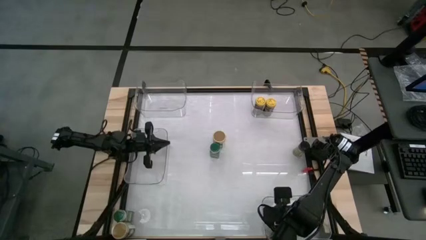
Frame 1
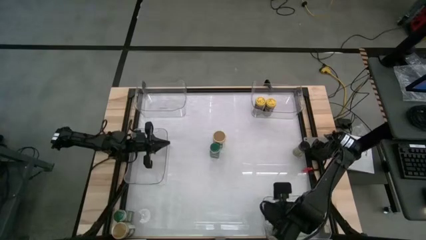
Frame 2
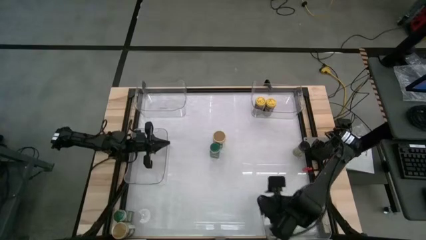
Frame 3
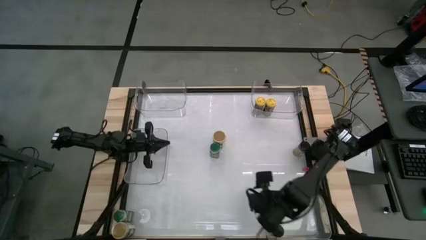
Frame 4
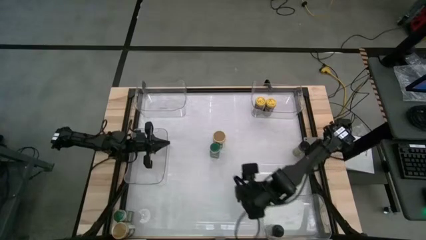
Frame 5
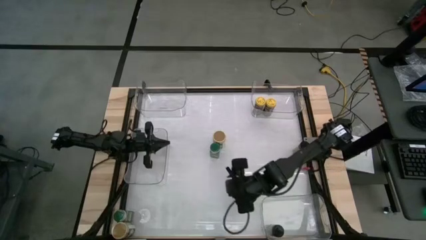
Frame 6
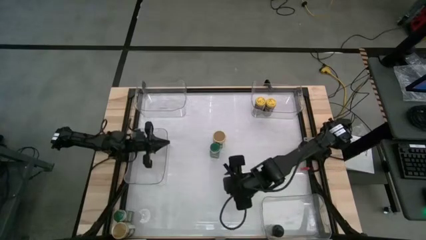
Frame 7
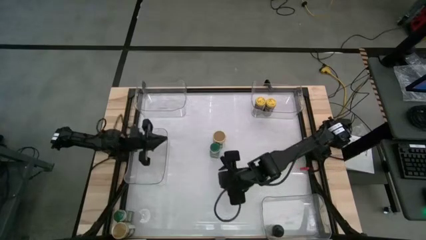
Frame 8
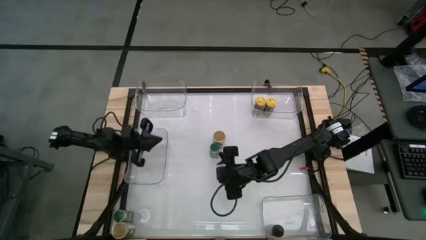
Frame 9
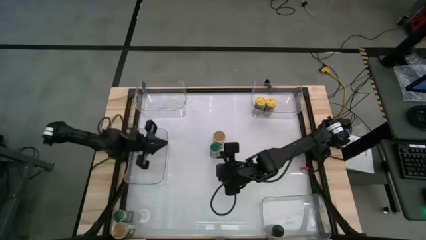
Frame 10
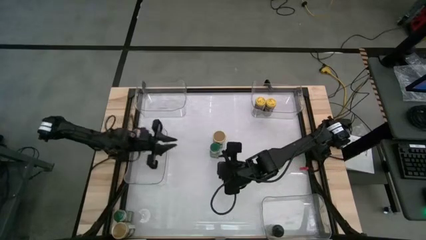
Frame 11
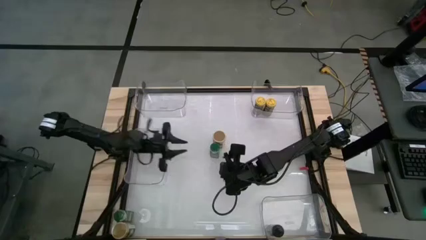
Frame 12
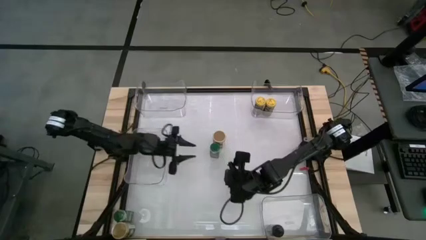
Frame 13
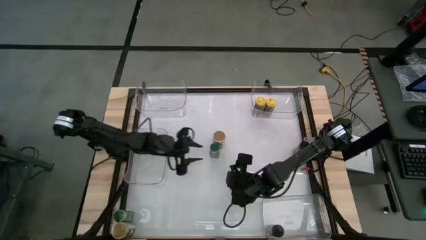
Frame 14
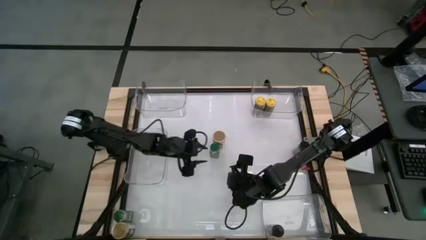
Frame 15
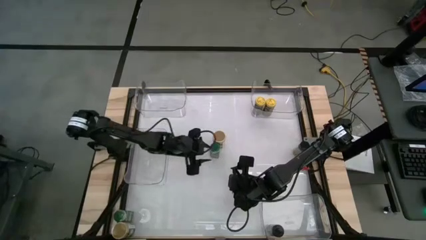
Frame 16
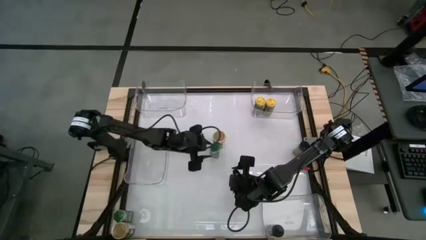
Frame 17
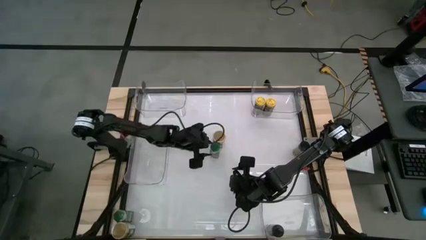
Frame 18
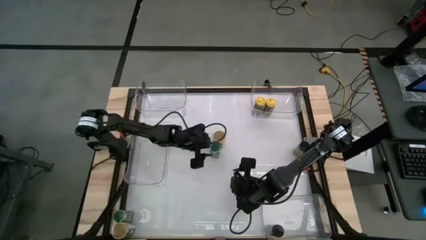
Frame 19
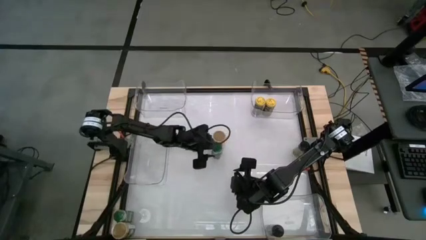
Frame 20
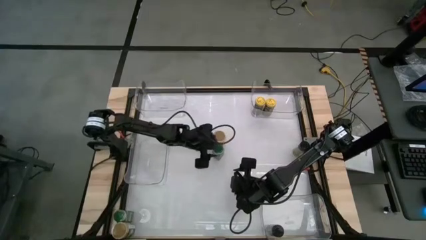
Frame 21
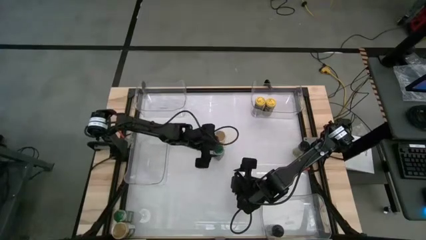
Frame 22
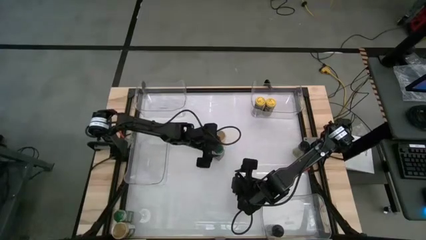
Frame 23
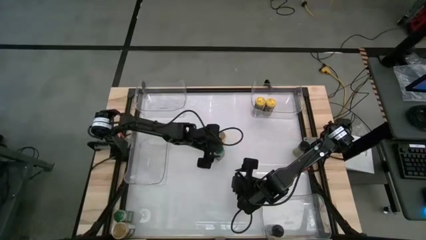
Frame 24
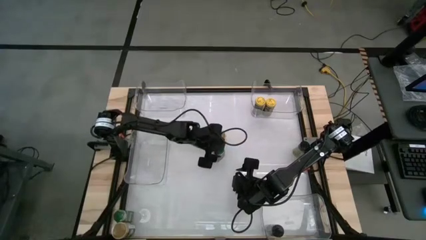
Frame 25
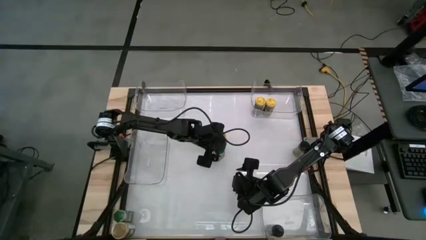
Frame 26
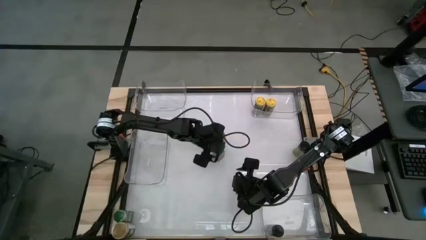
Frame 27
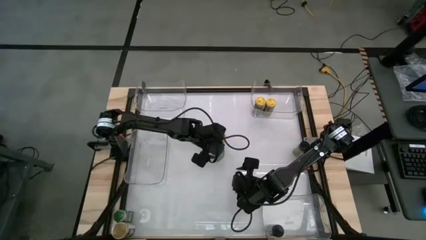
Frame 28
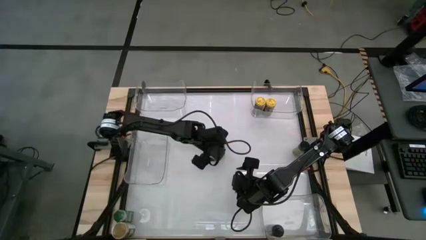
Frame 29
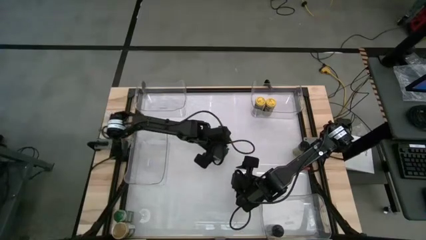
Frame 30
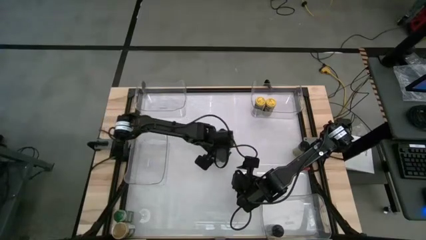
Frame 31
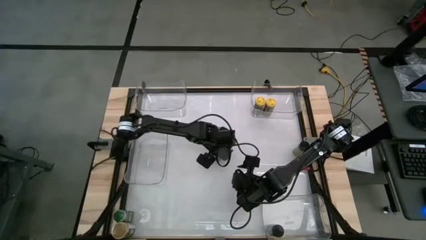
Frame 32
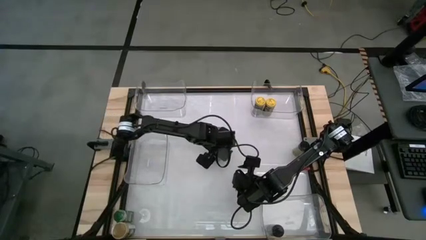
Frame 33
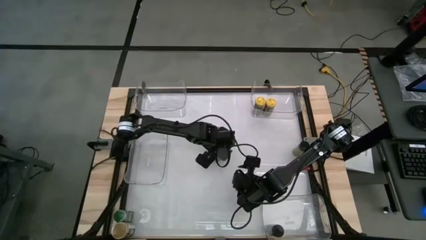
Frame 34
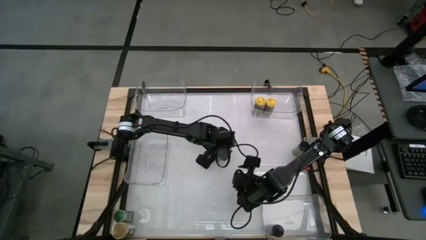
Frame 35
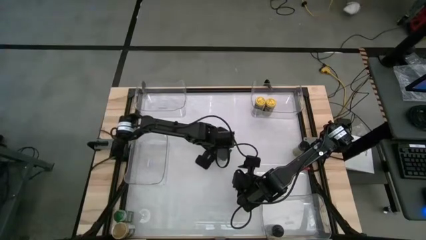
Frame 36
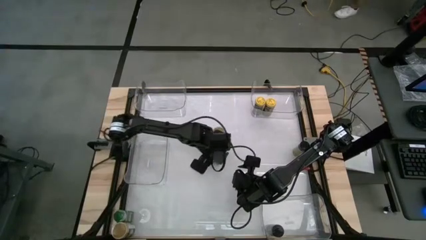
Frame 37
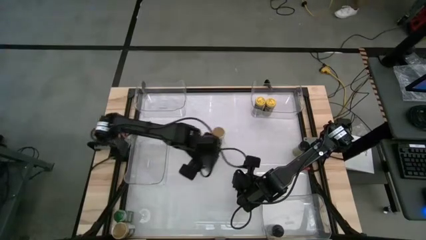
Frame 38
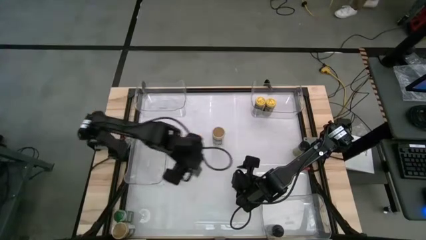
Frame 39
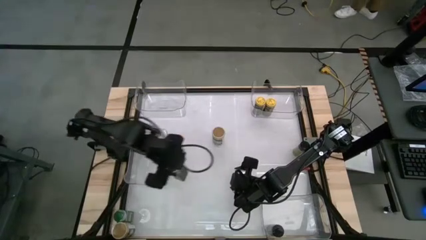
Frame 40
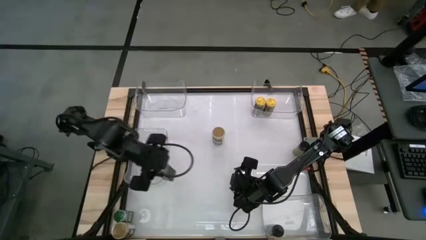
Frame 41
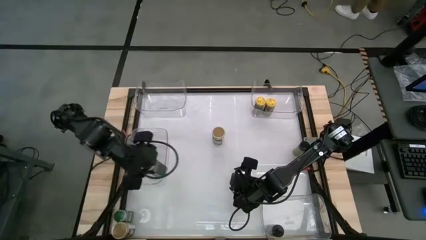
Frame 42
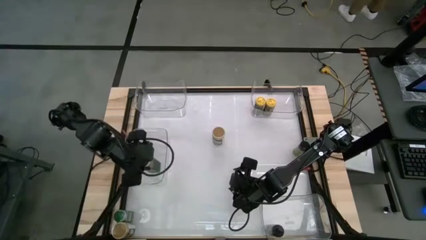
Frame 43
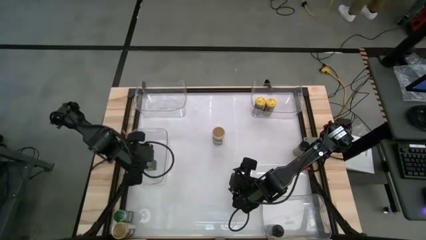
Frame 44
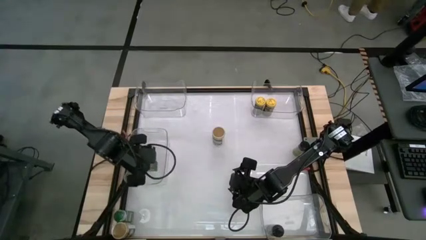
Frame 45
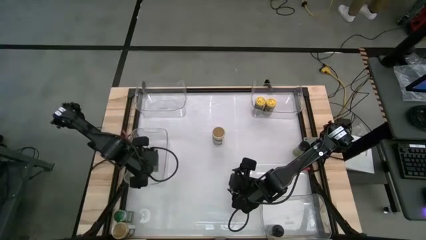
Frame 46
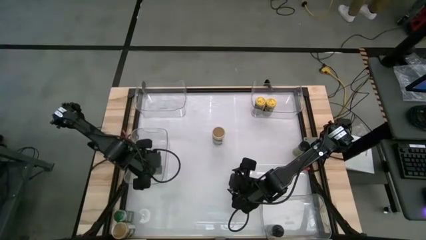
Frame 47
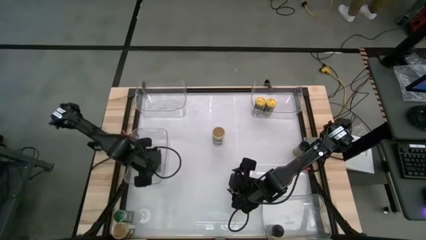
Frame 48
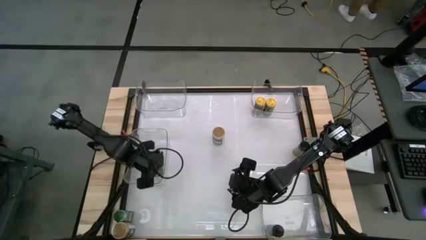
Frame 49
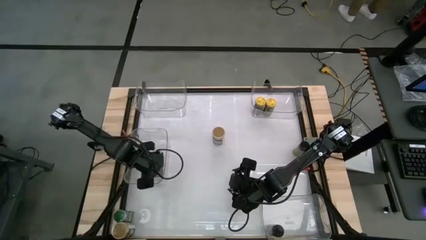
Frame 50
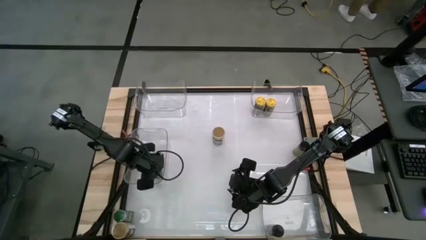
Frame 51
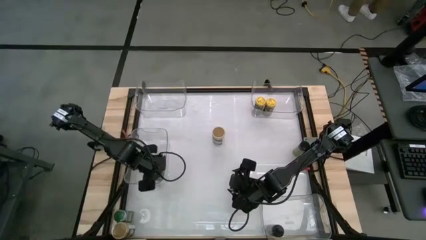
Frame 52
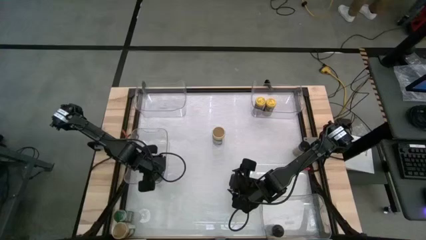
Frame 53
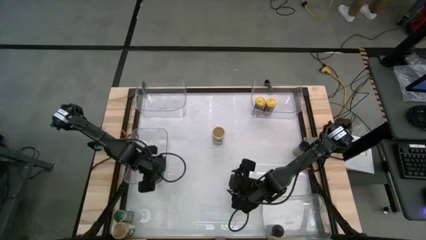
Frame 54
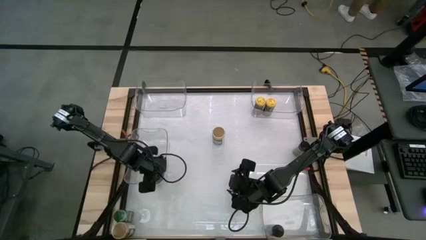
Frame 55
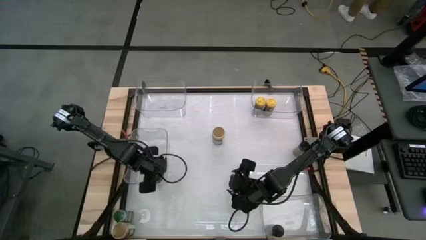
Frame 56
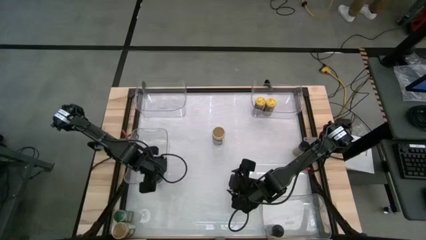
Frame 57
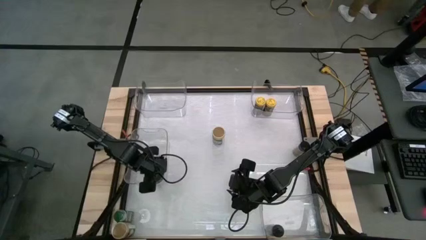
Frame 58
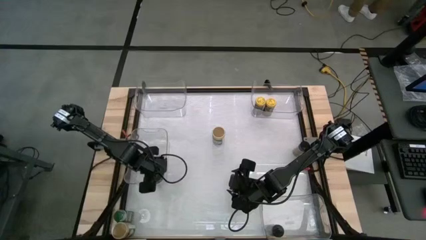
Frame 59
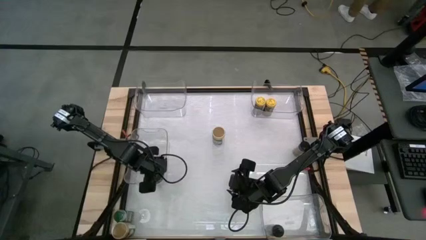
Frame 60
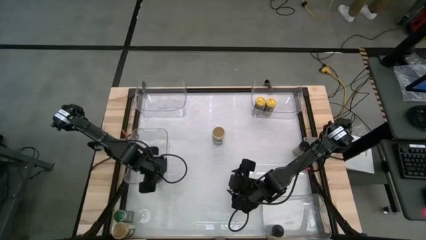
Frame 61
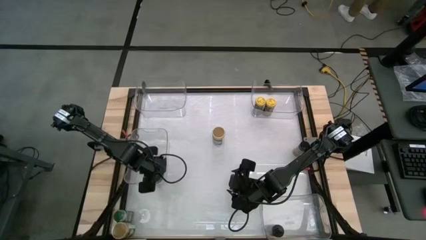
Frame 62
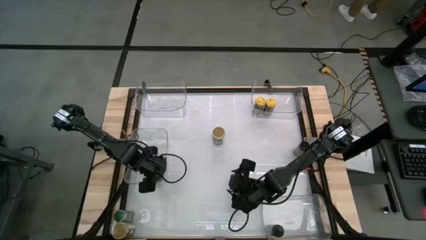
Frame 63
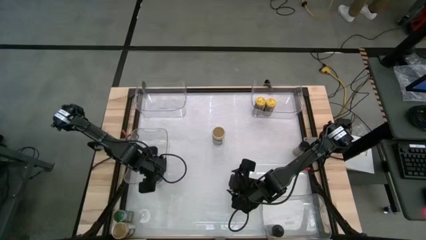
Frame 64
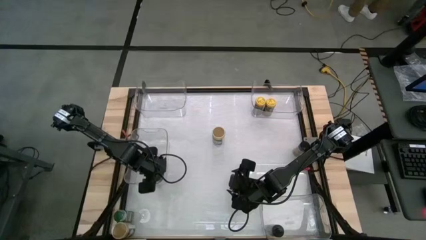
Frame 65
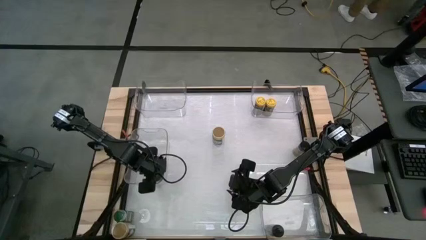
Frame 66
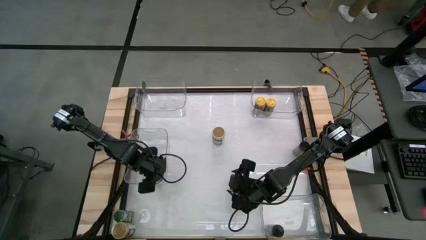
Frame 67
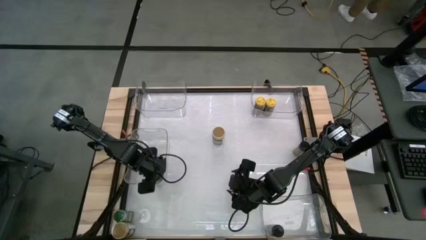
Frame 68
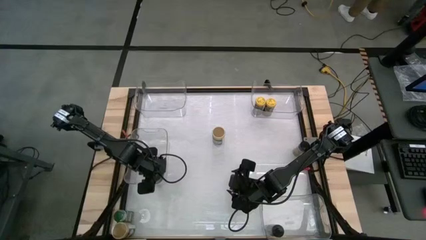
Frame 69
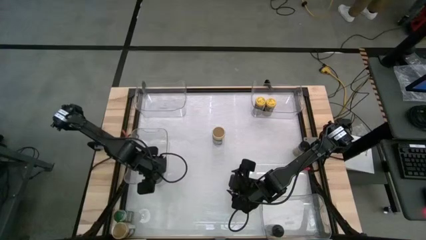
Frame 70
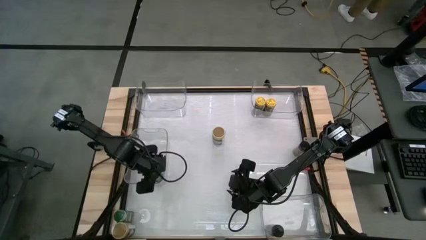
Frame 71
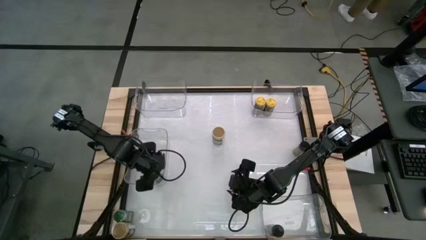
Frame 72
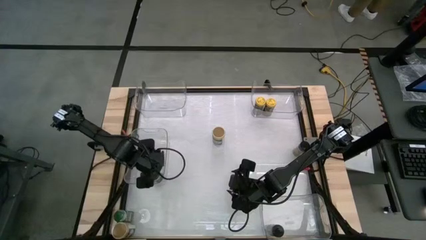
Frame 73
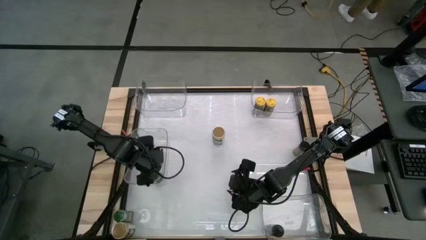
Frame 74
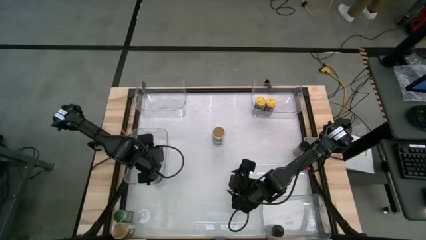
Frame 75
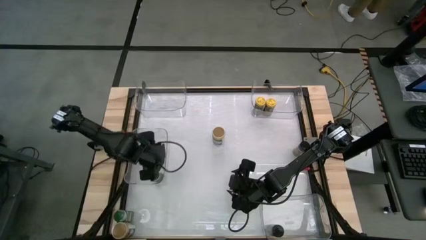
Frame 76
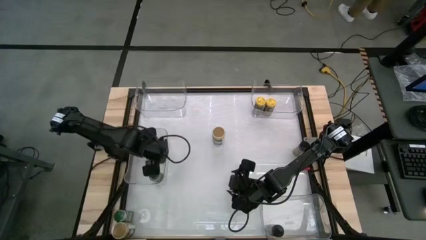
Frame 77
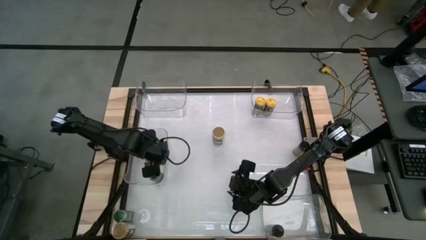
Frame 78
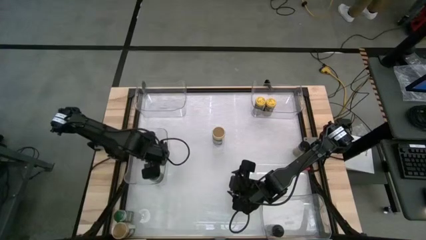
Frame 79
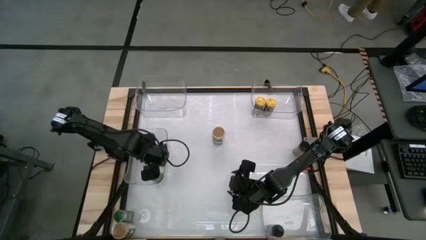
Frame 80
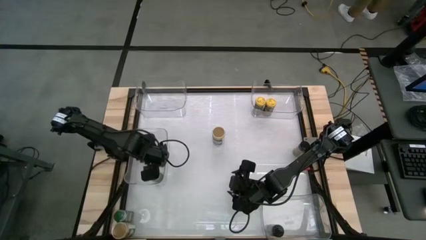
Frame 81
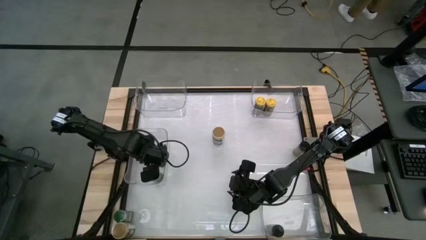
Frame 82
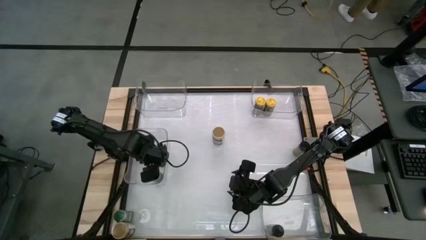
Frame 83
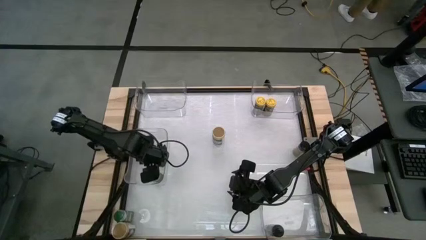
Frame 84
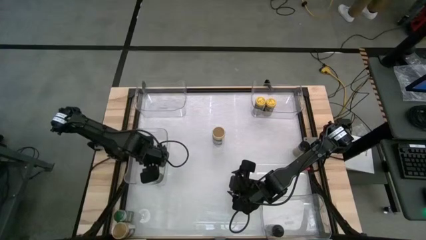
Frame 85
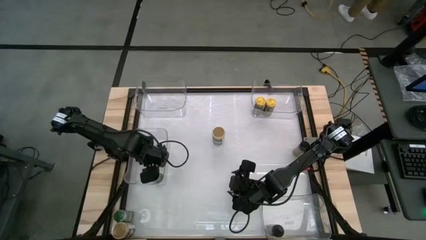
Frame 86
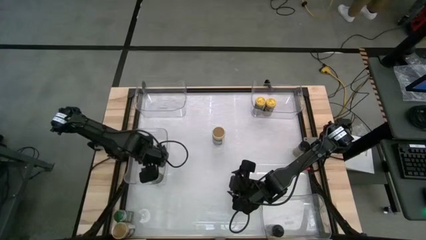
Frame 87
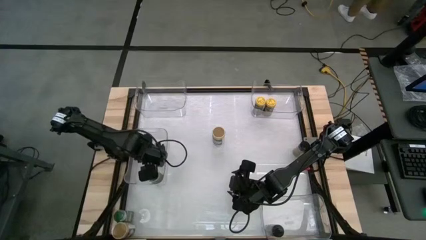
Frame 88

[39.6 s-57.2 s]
Task: Sort spices by type
Put the top green seasoning bottle into the middle transparent bin
